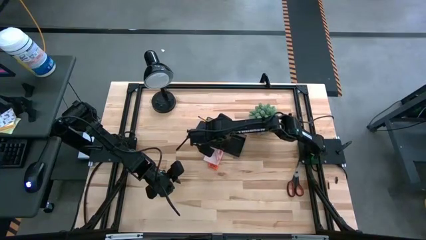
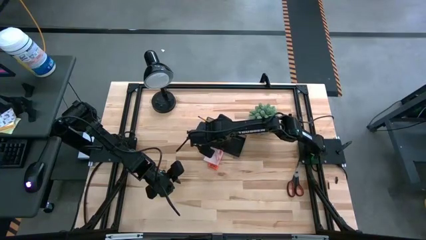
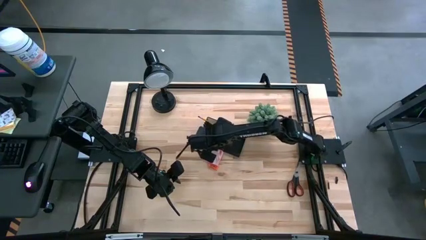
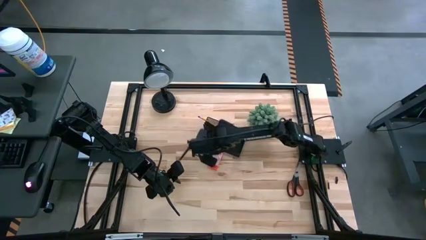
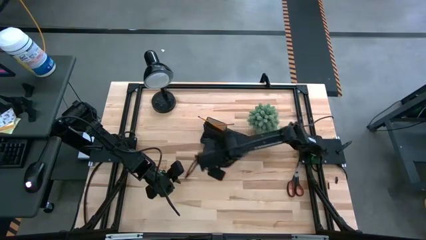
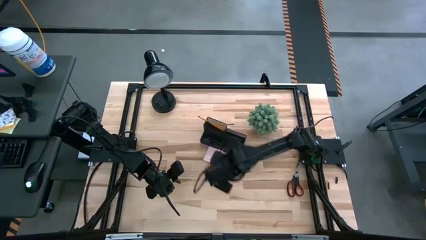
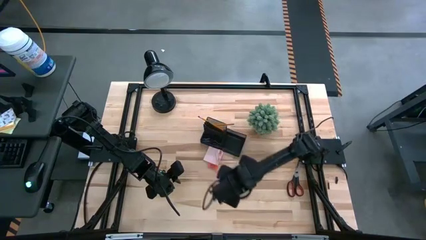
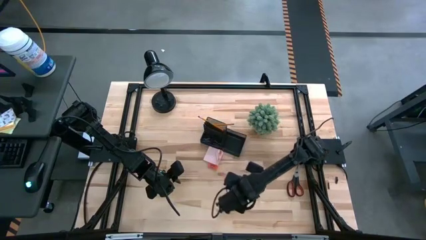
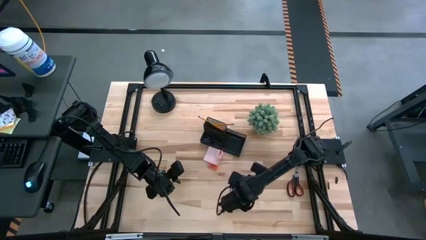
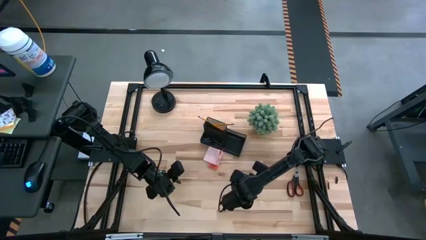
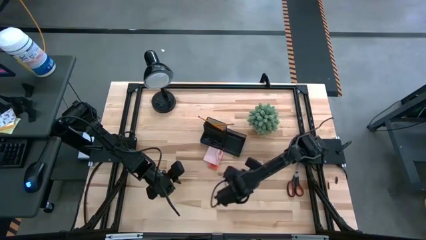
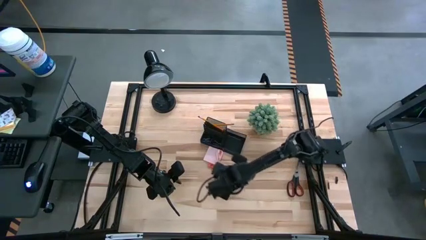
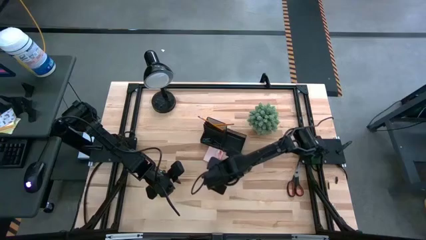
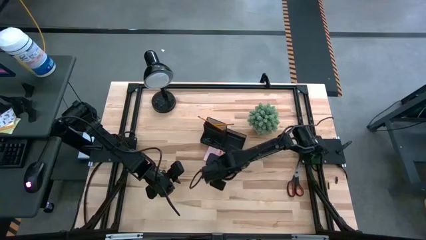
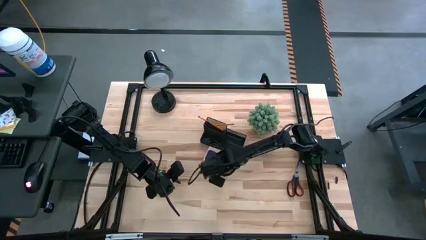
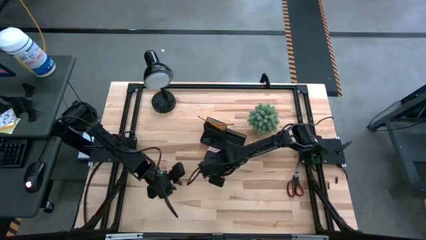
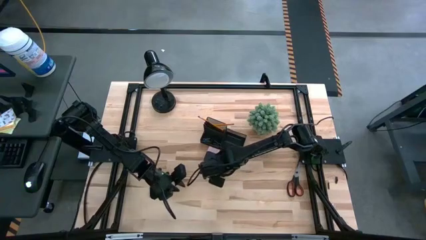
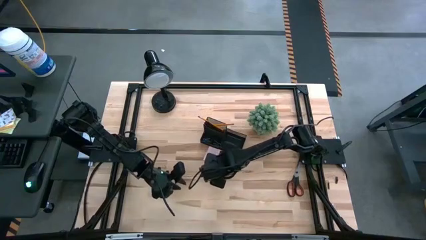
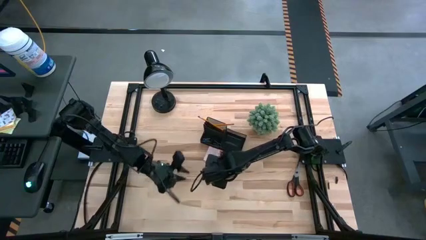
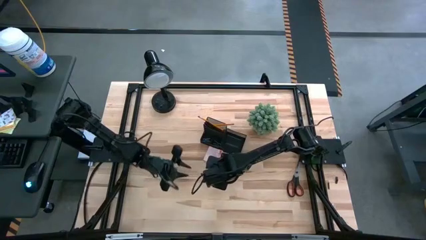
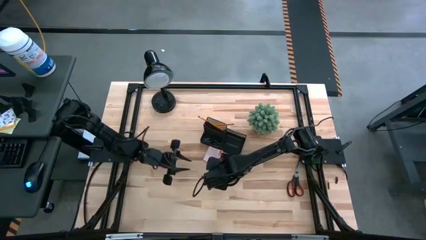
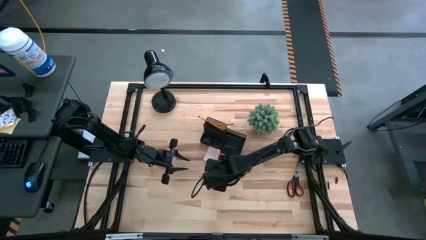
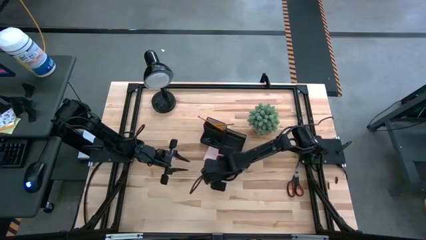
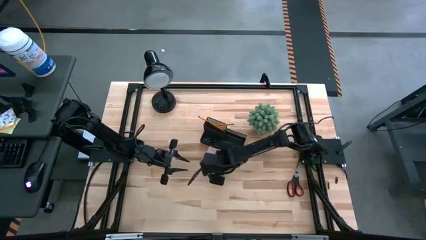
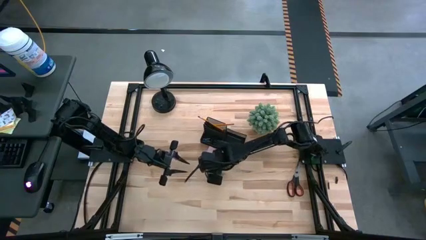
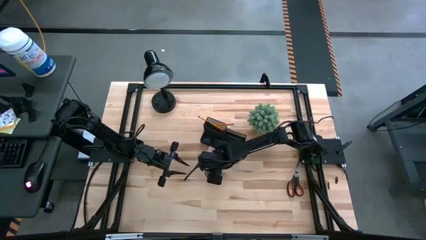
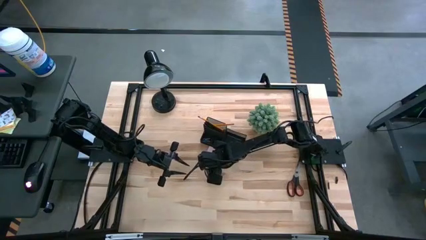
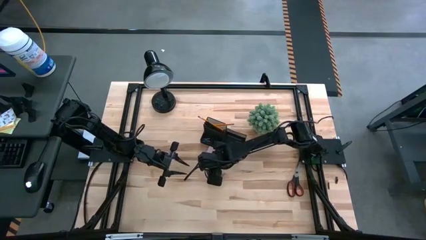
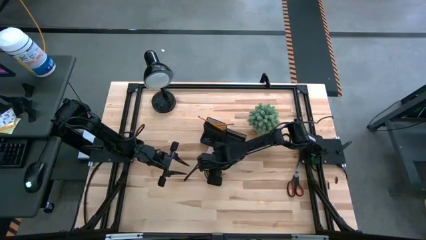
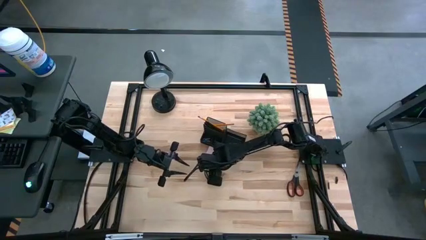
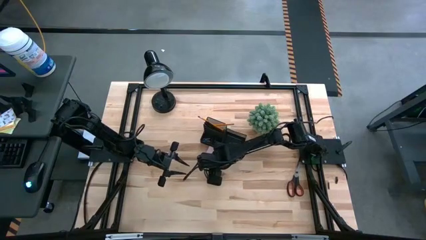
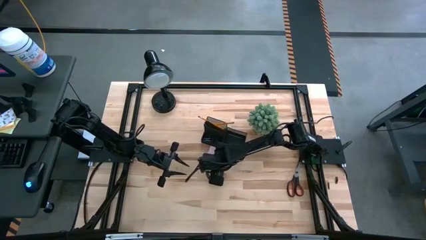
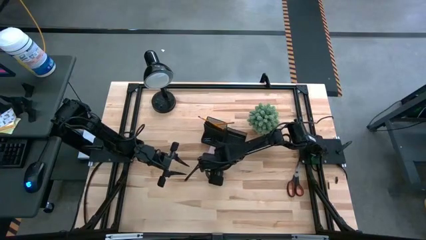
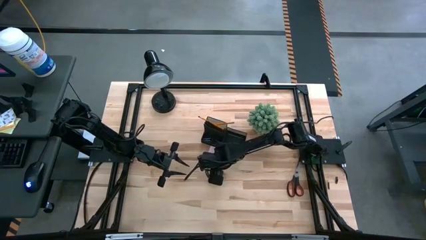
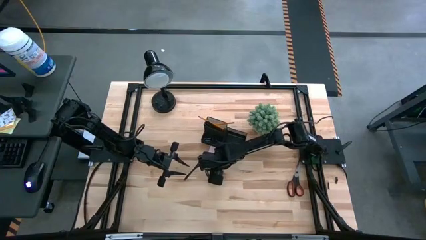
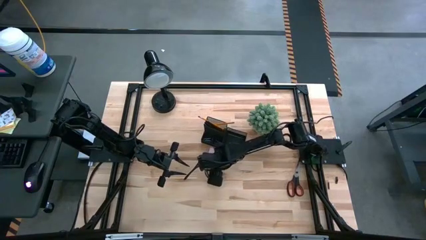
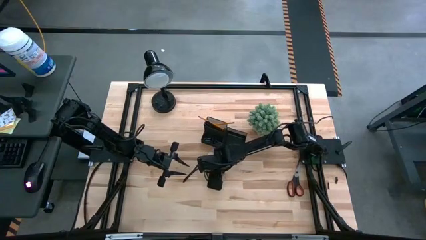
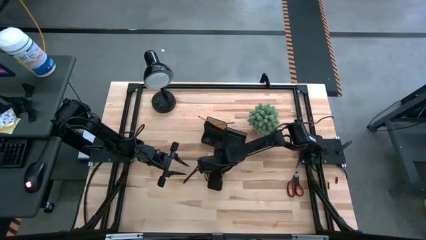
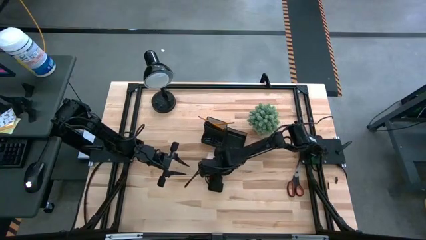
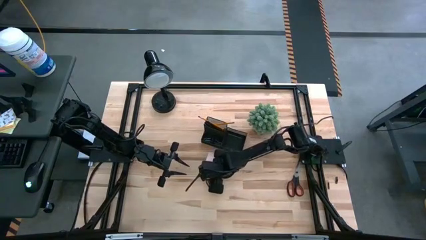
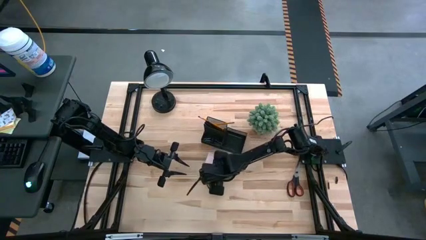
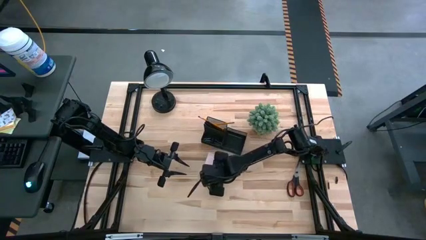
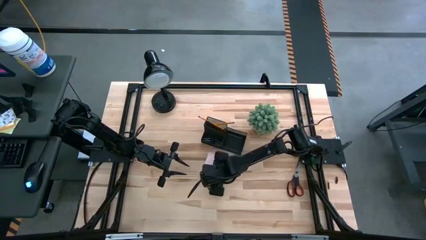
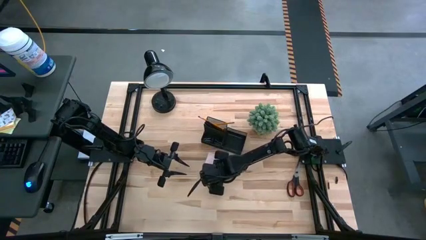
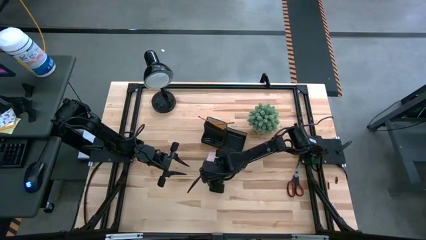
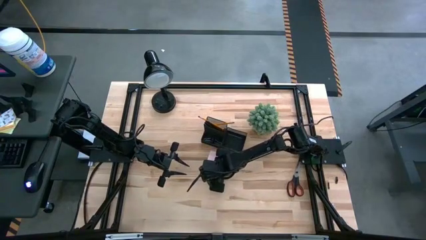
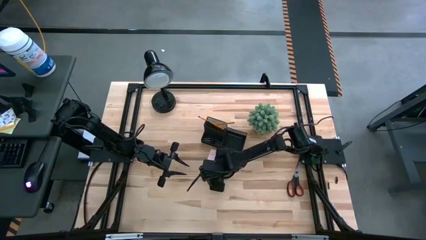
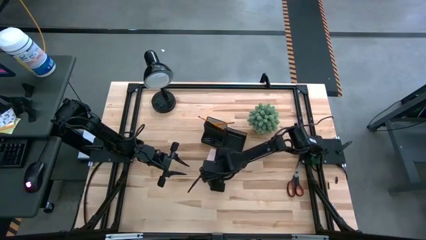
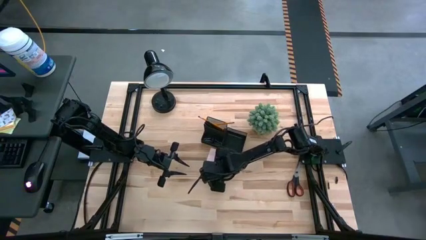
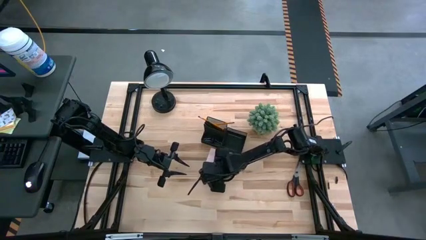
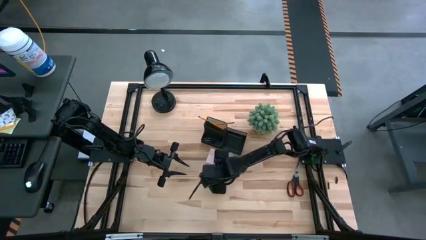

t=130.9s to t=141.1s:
Task: Pick and place office supplies into organizer
Adjust the pink sticky notes

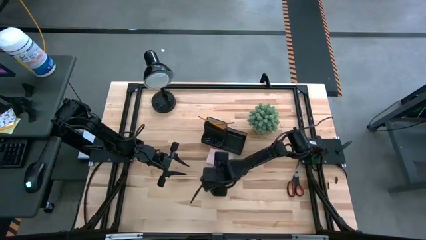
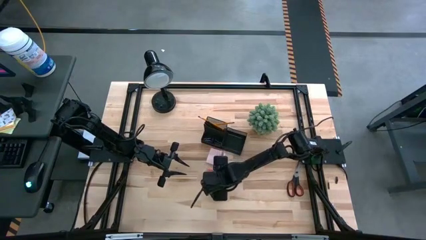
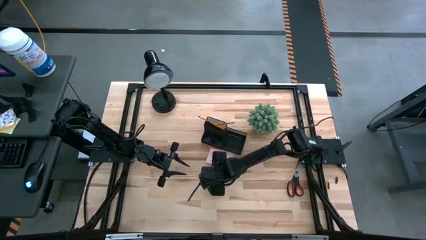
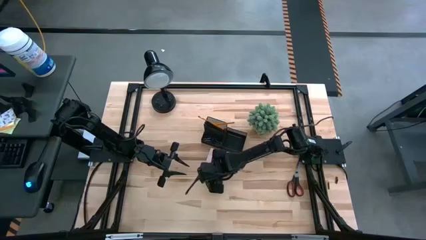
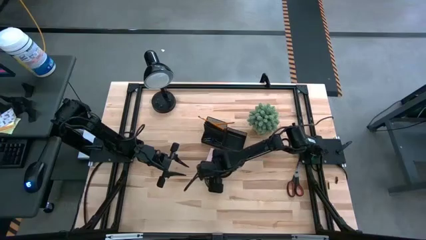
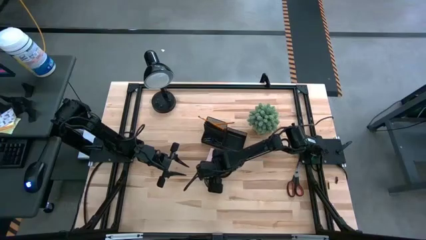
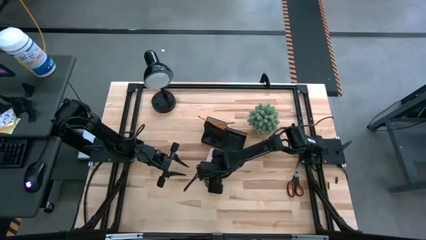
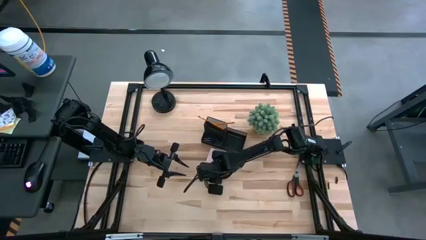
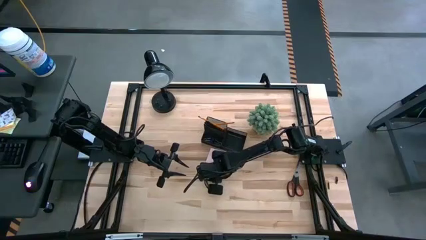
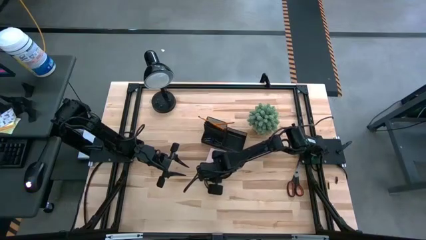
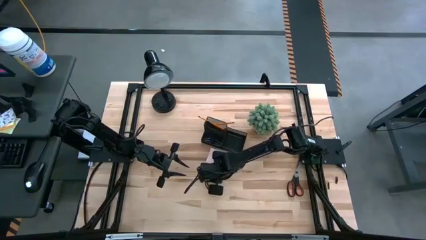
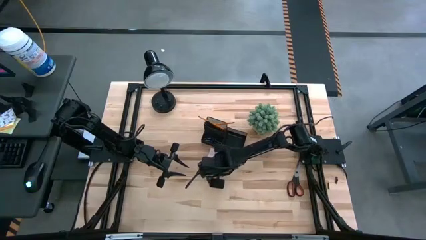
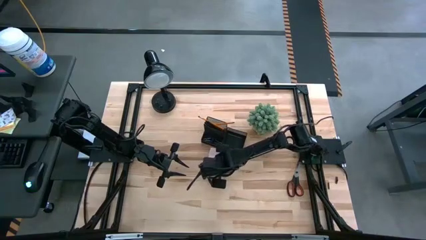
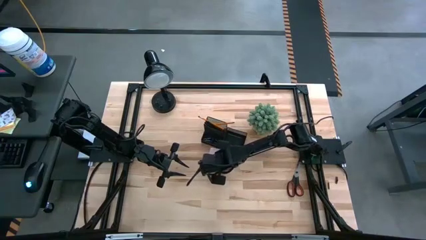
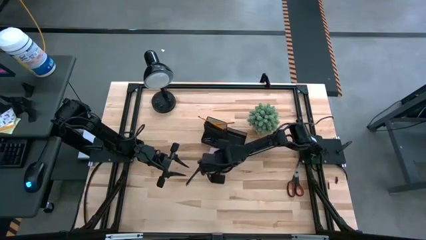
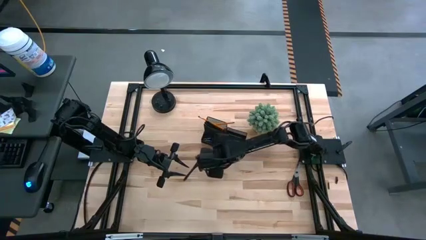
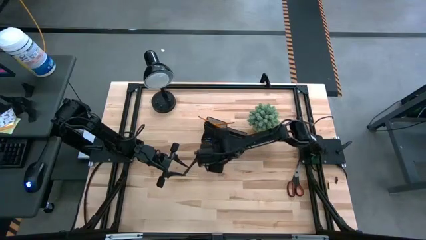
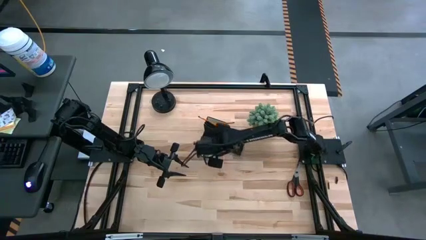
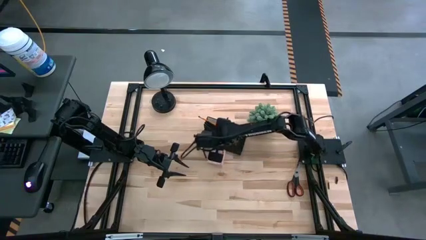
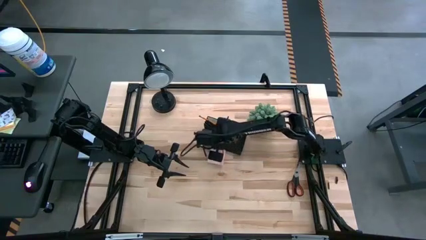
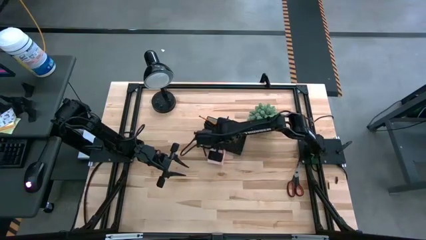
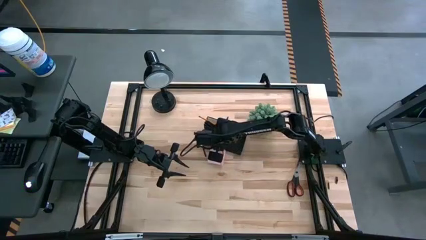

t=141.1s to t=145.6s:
Put the orange eraser into the black desk organizer

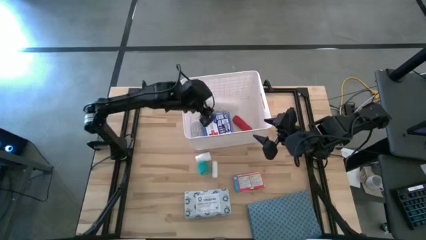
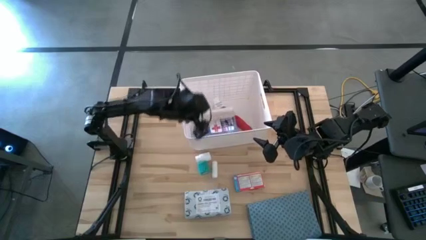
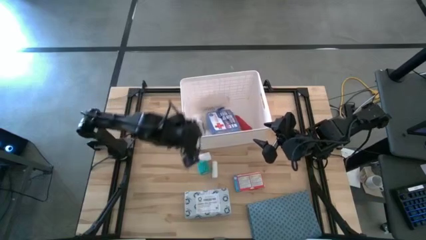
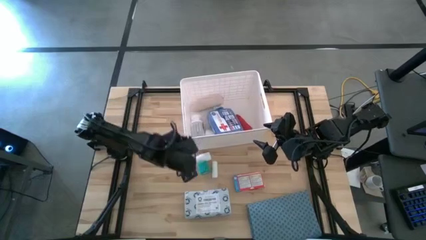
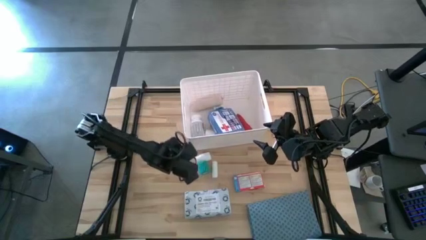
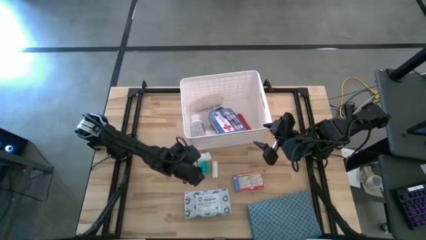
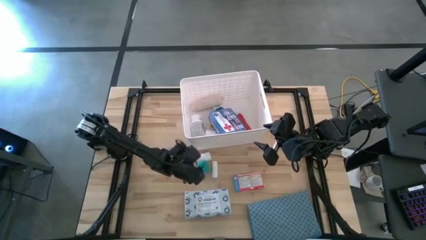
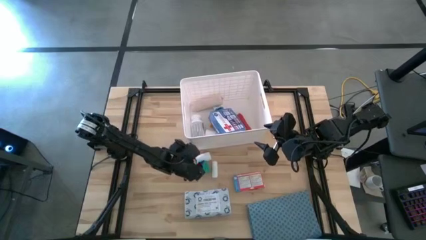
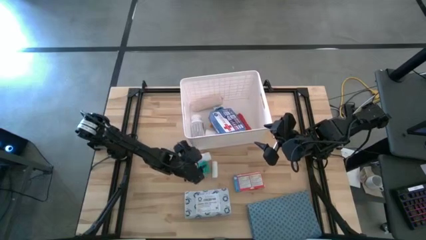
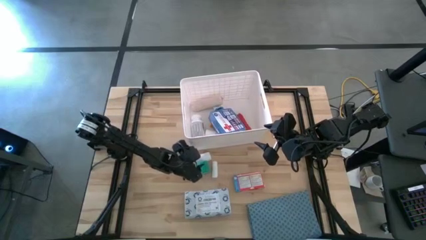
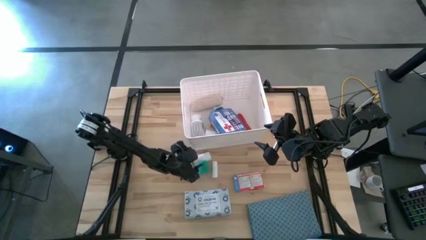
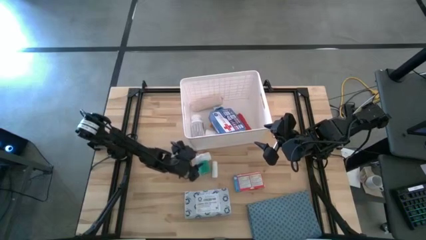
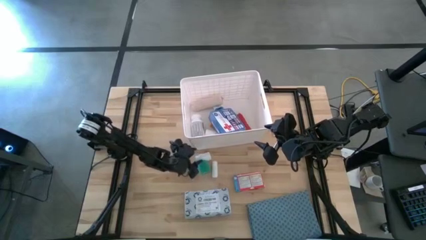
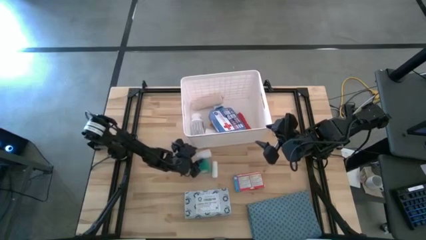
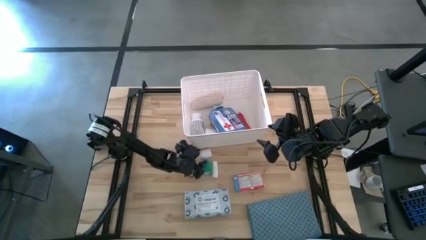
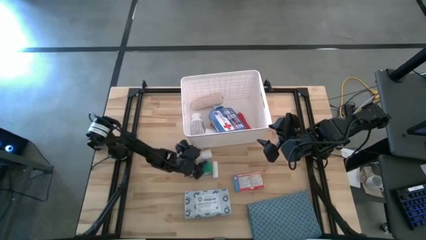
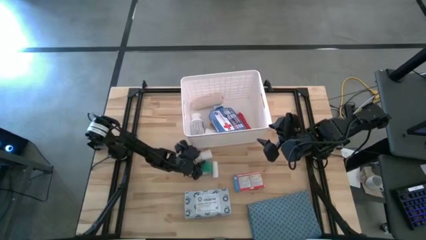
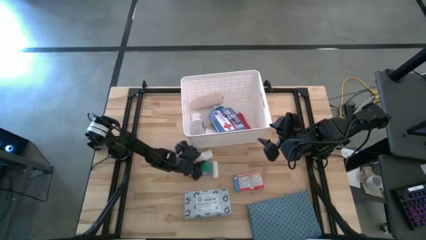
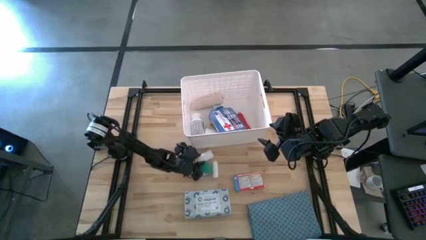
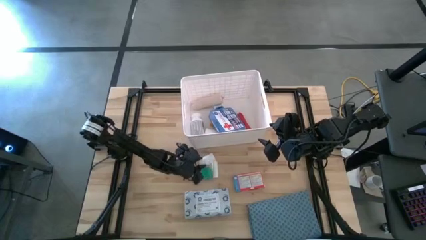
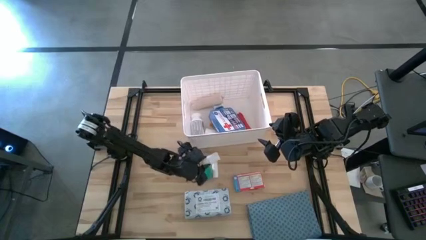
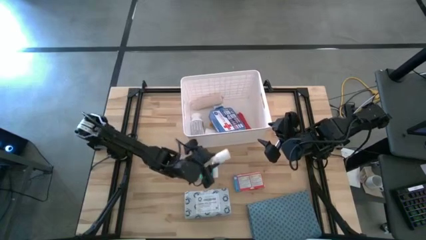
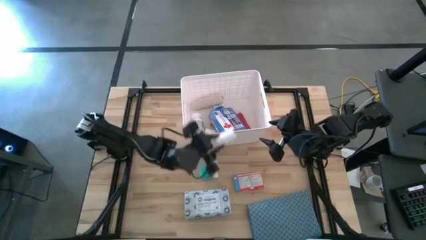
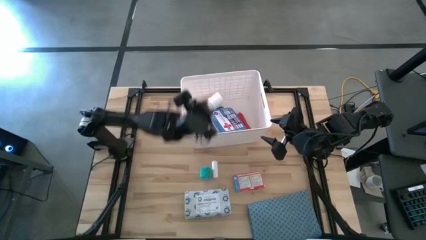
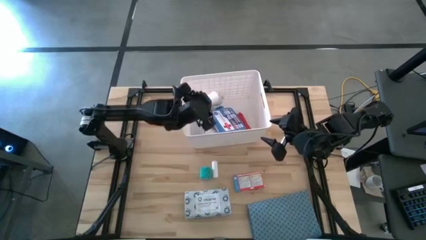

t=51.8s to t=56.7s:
Task: Pick & place medical supplies in basket/bin
Put the white pill bottle into the white bin
